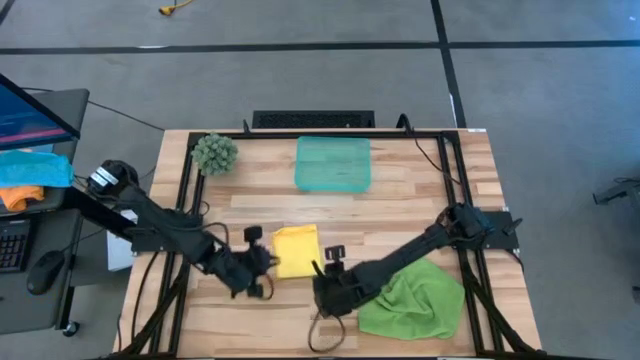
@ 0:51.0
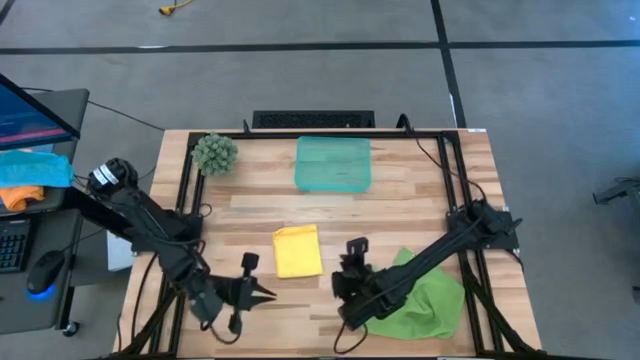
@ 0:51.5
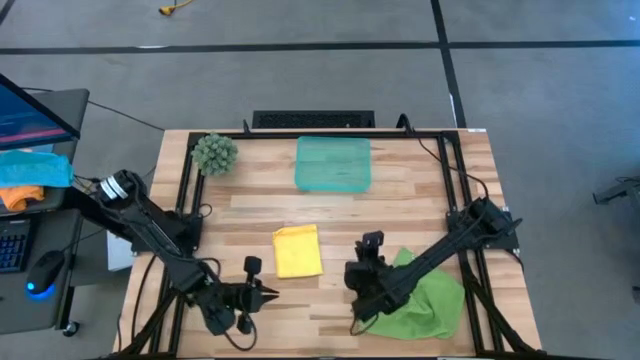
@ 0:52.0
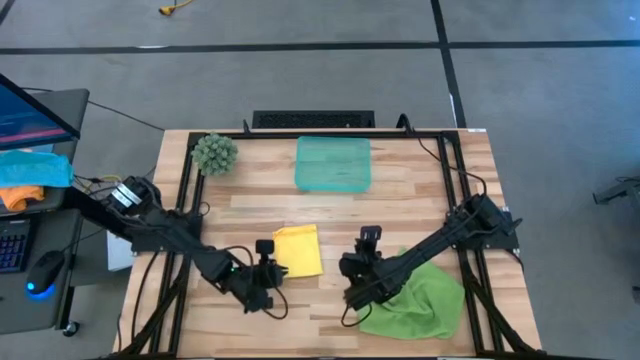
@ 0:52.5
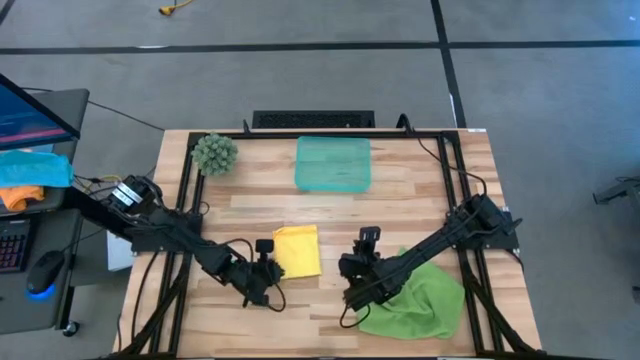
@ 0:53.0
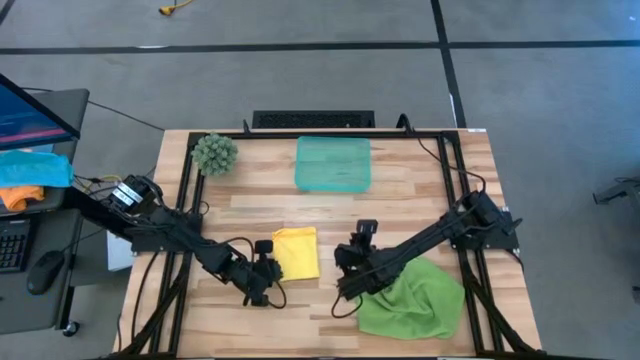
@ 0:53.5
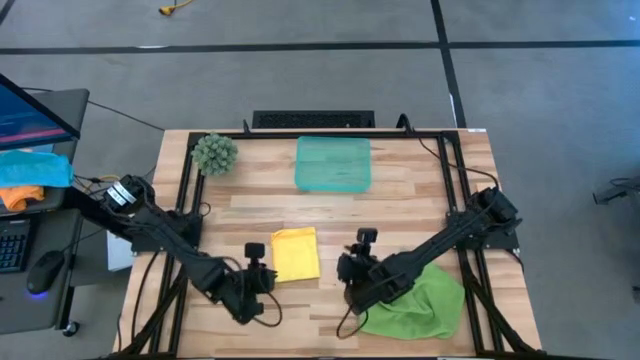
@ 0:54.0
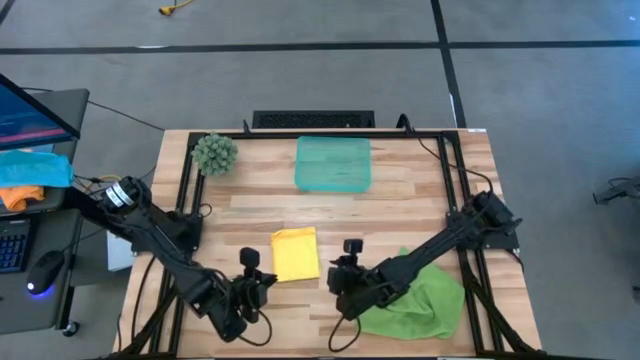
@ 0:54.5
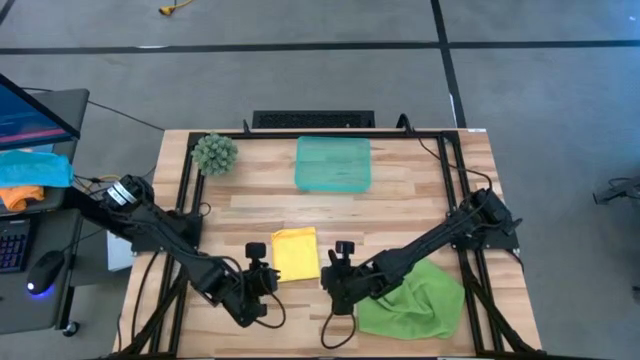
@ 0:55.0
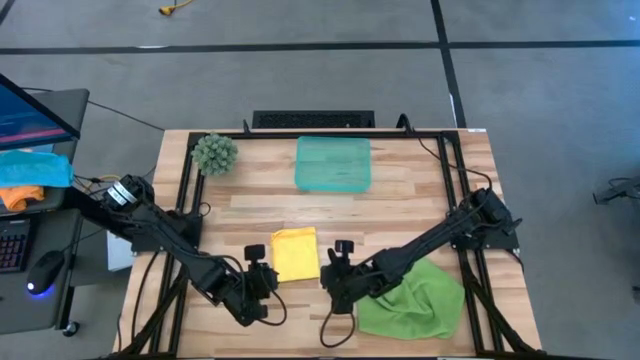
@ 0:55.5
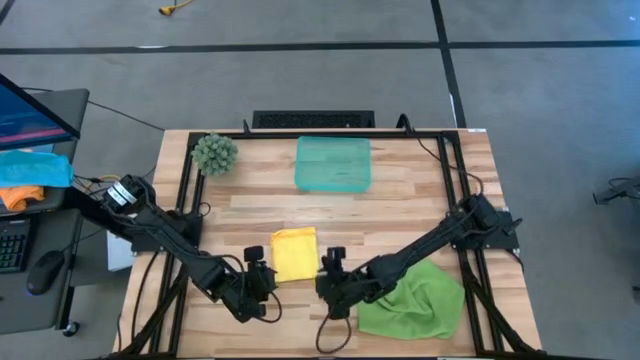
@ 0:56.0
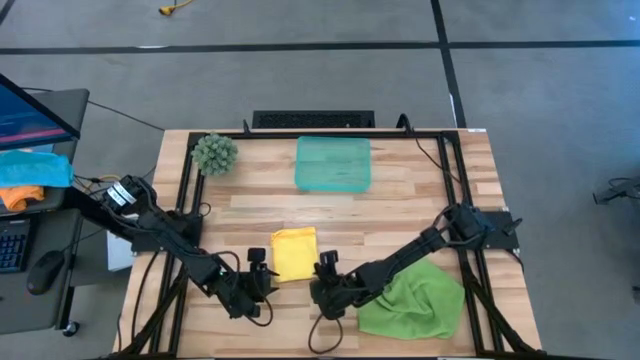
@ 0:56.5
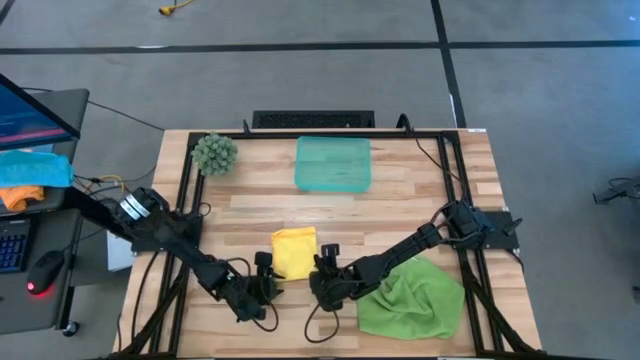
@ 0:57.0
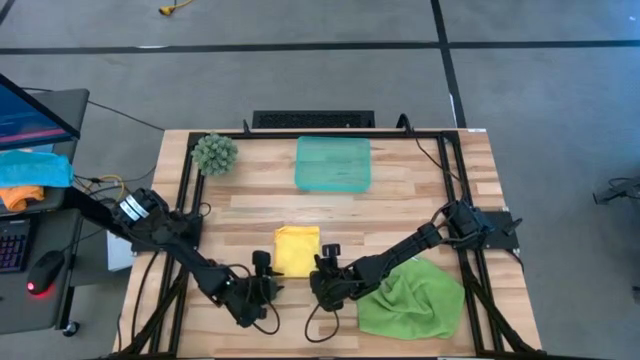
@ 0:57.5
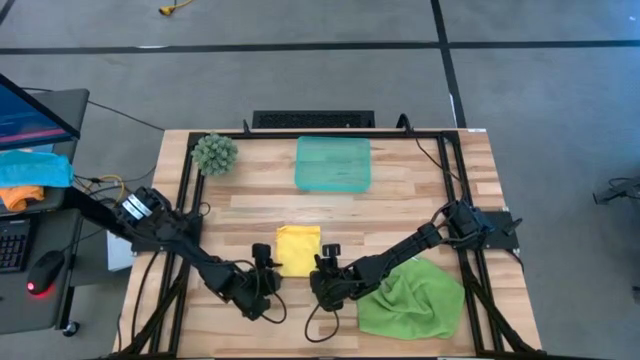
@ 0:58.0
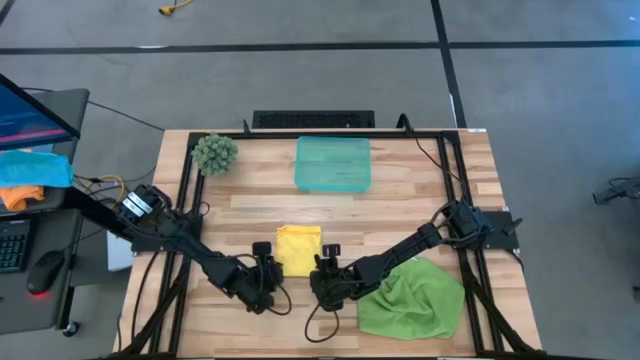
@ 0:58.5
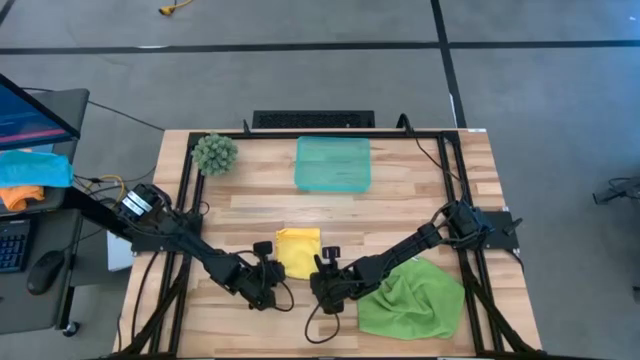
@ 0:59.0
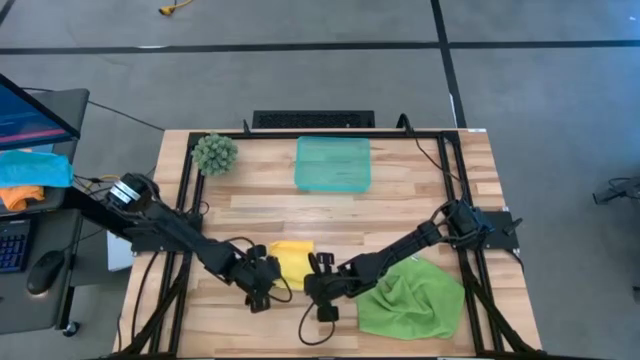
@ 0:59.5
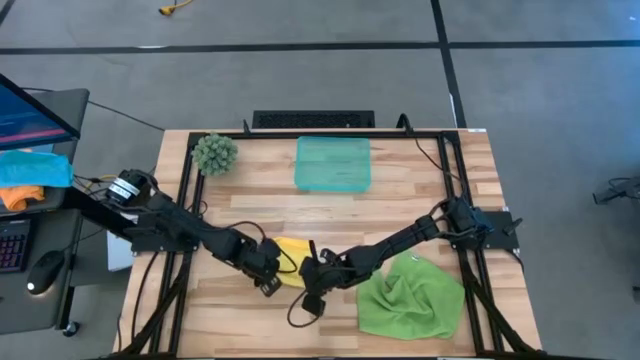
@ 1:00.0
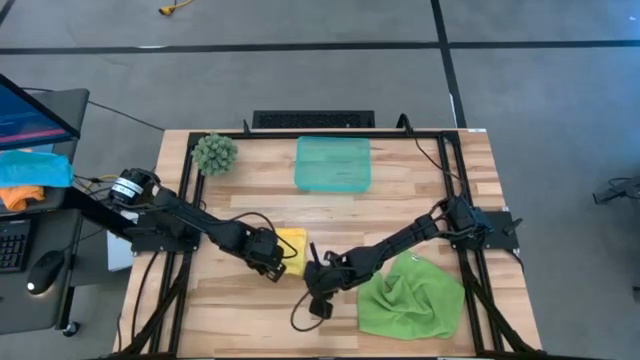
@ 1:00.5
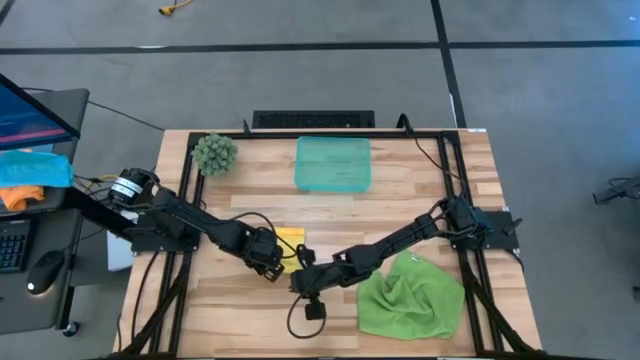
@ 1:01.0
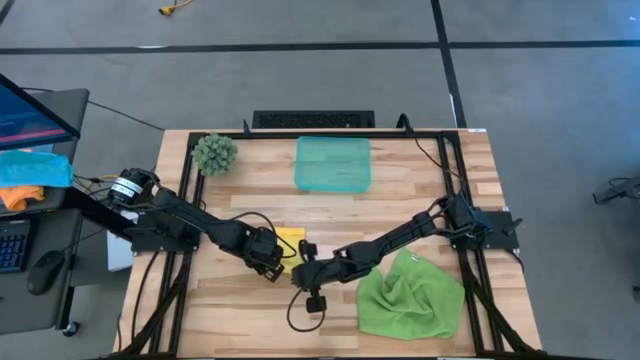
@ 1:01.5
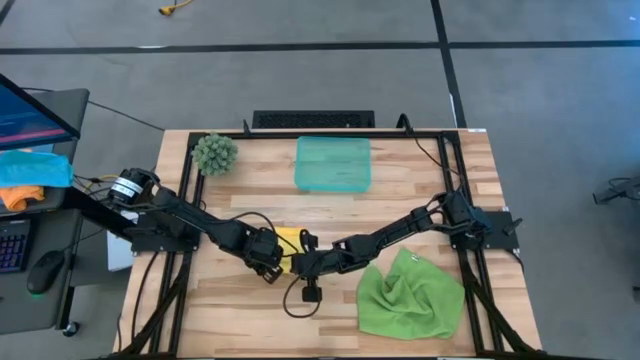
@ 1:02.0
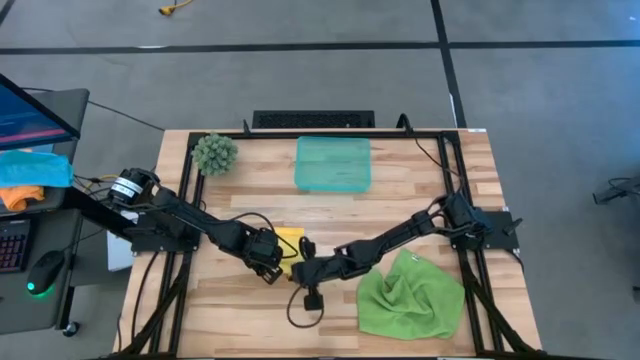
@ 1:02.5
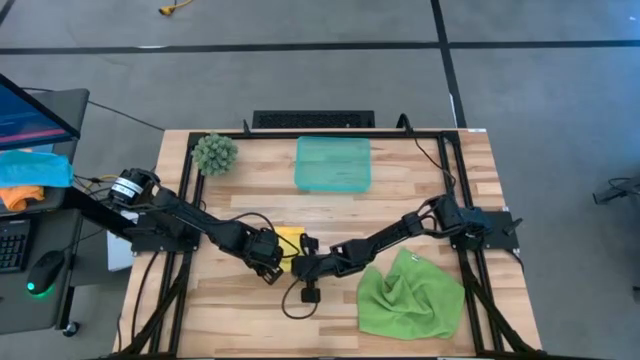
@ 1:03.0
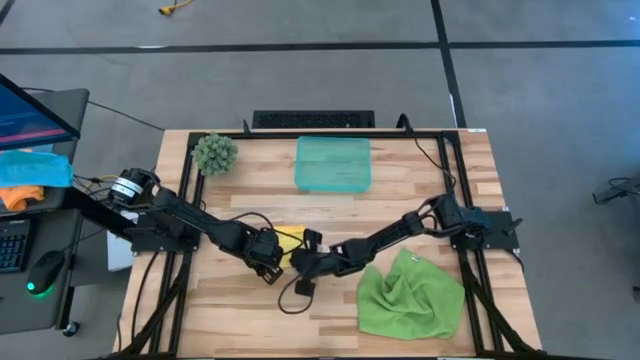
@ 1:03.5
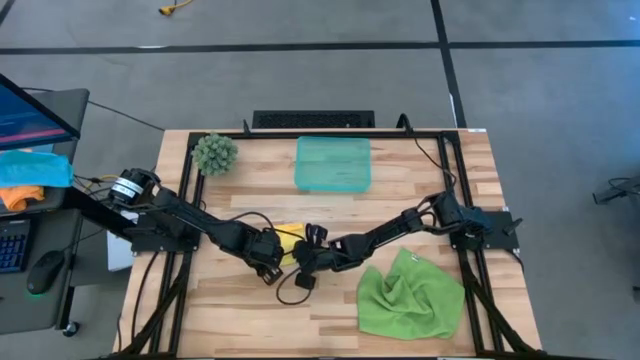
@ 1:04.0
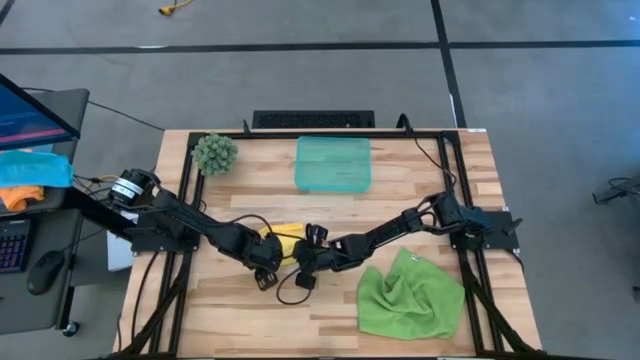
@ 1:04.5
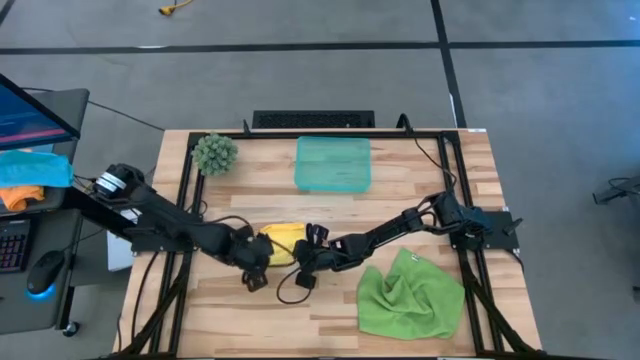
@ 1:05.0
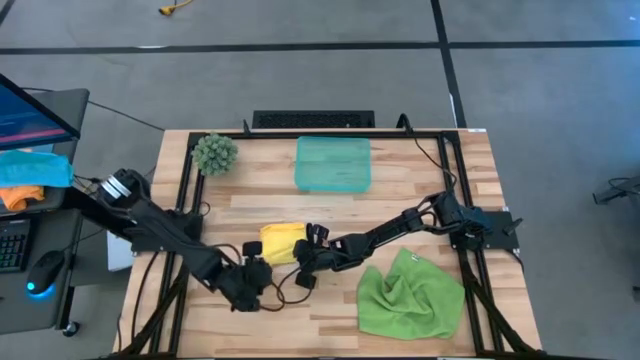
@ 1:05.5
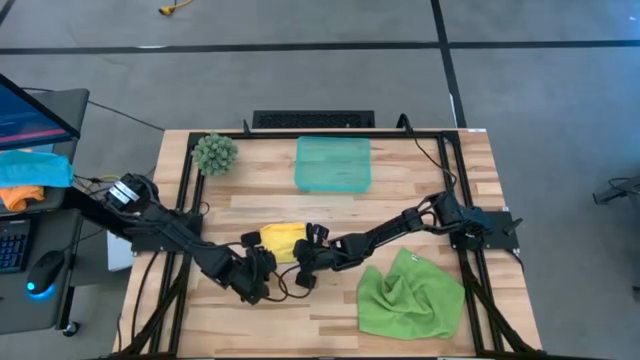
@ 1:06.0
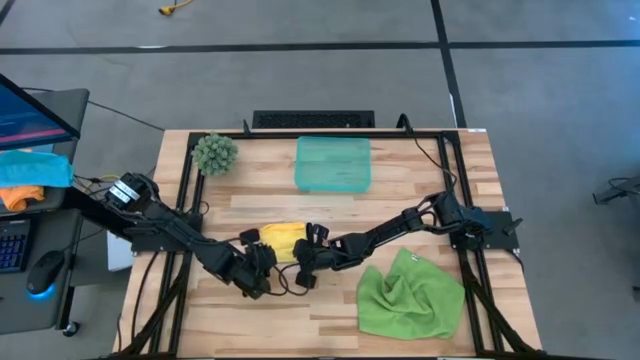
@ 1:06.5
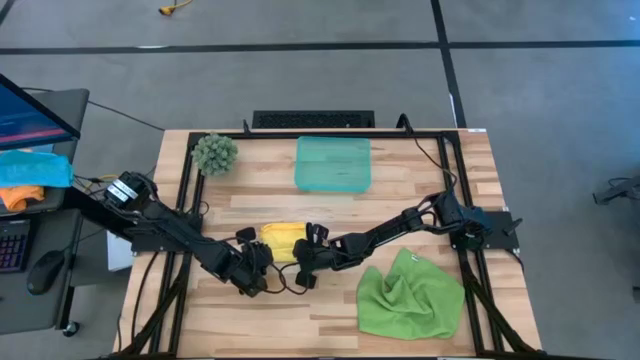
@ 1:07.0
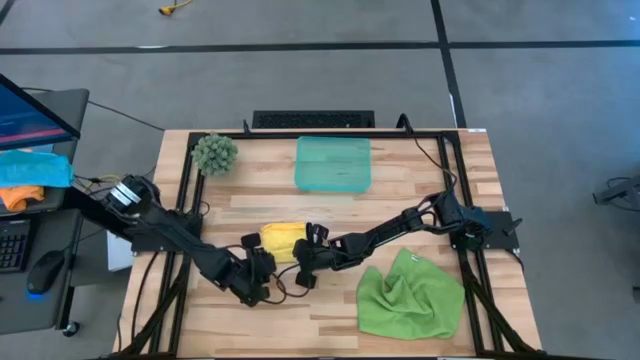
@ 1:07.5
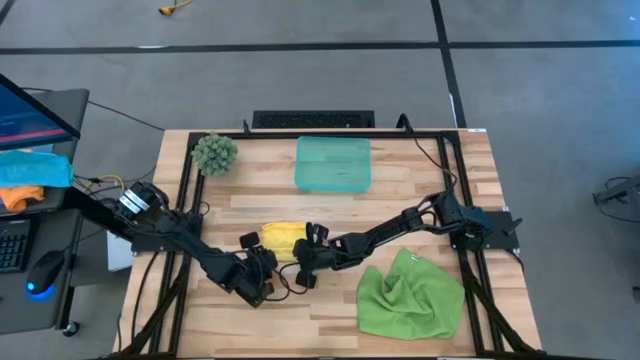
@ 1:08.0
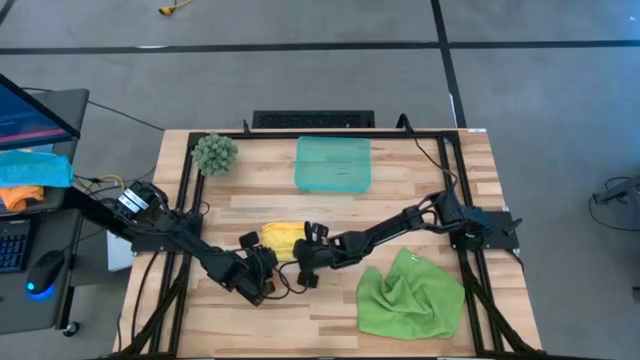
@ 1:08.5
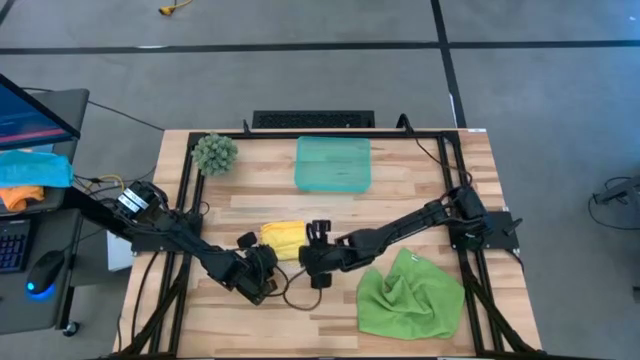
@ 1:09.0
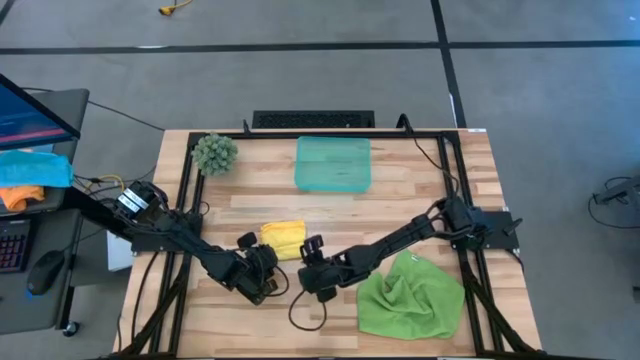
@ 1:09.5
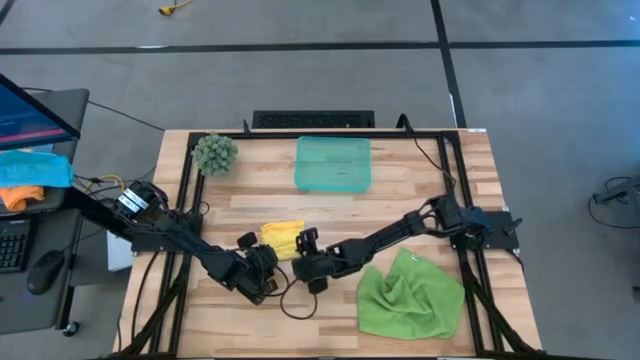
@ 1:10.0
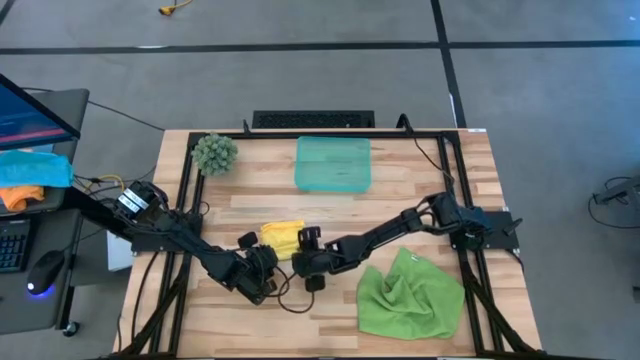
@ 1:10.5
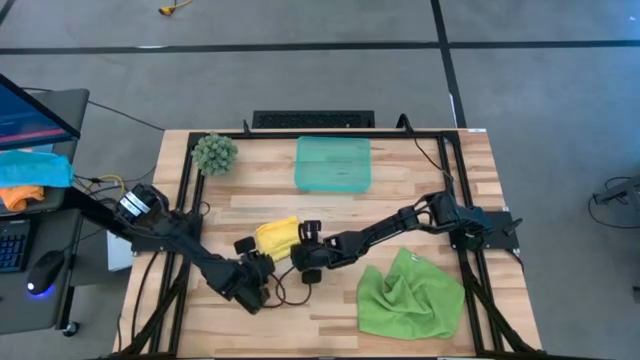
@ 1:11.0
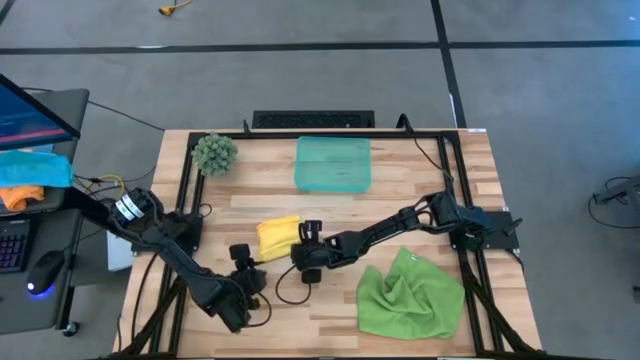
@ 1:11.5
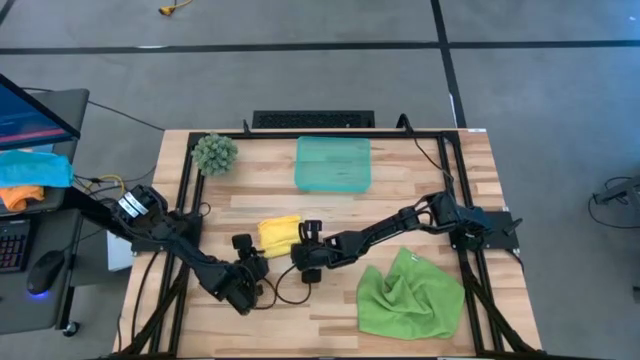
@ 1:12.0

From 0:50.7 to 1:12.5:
Task: Roll microfiber towels into tight, uniform cylinder then place into a basket
Roll the yellow microfiber cloth
